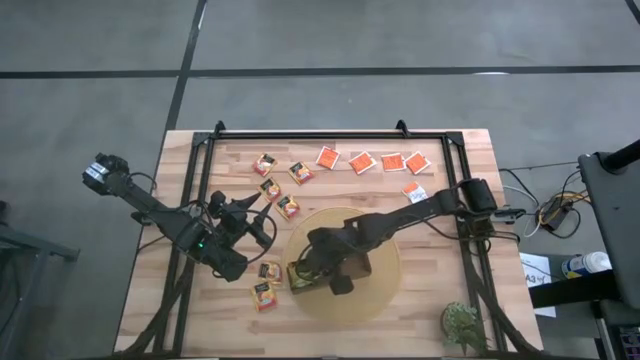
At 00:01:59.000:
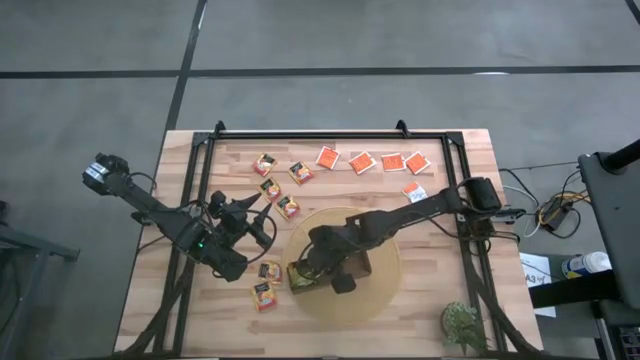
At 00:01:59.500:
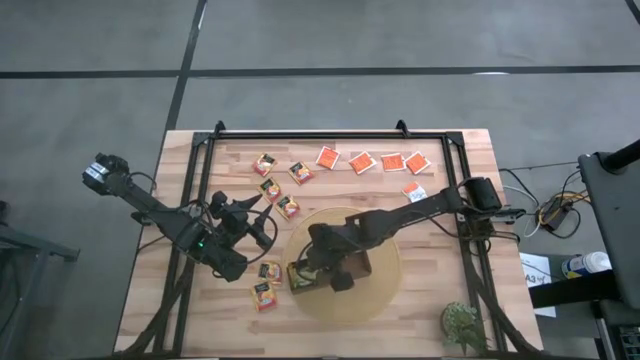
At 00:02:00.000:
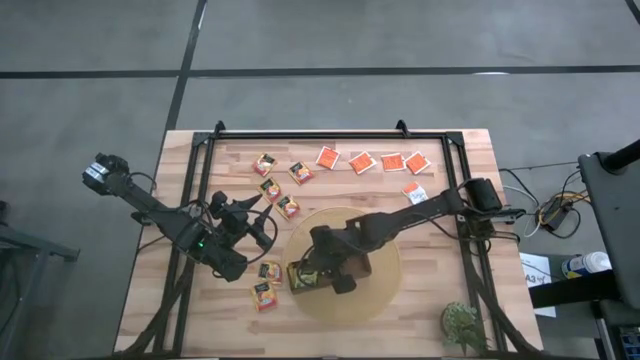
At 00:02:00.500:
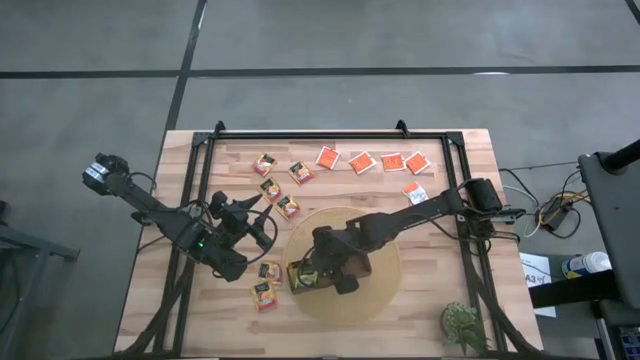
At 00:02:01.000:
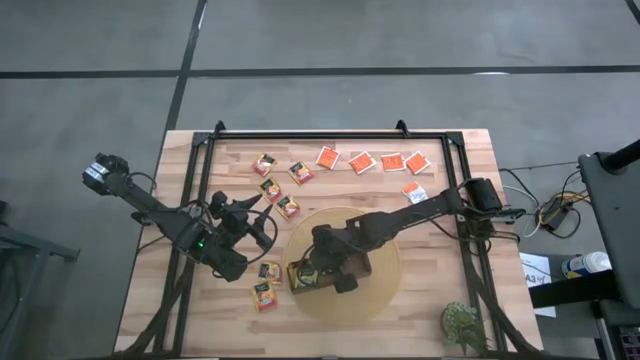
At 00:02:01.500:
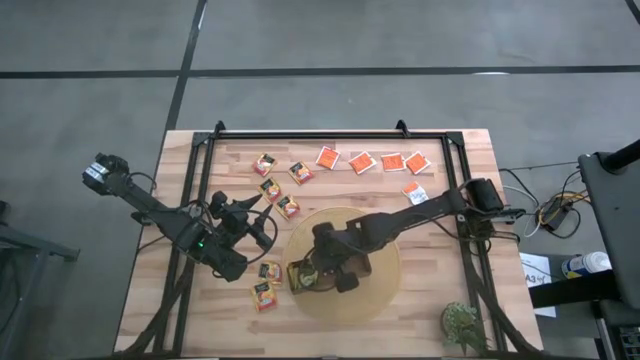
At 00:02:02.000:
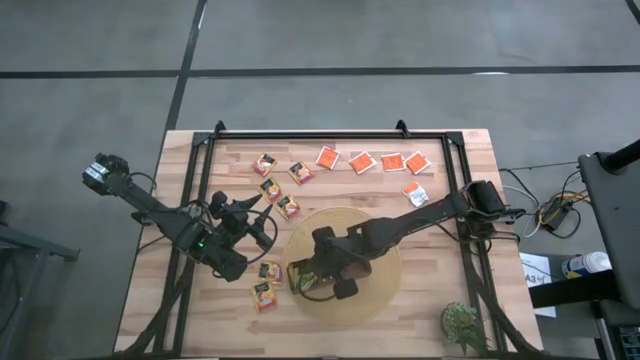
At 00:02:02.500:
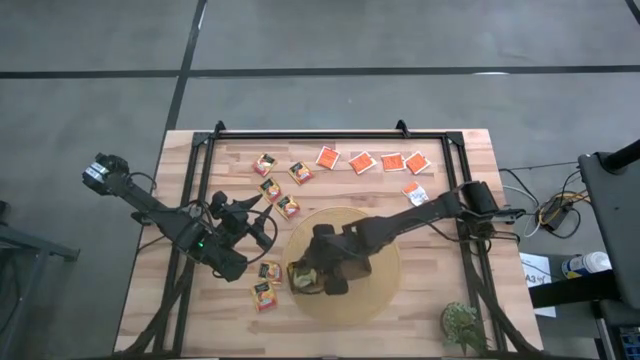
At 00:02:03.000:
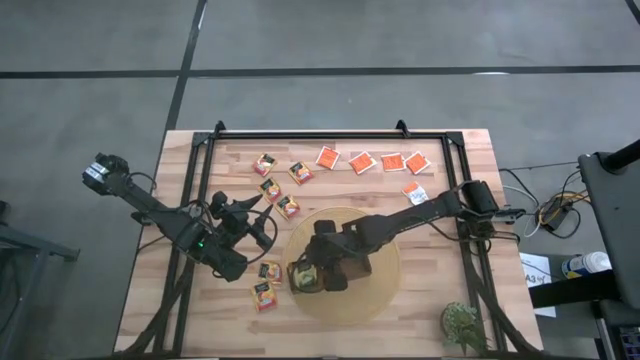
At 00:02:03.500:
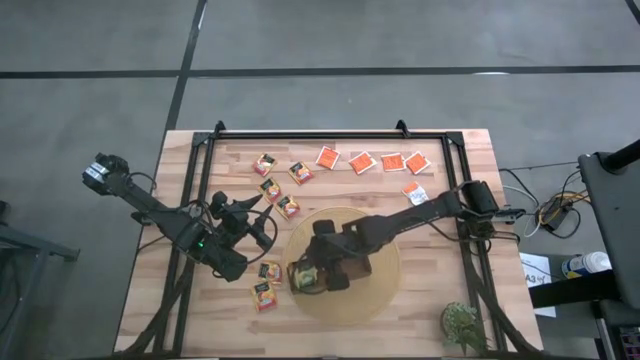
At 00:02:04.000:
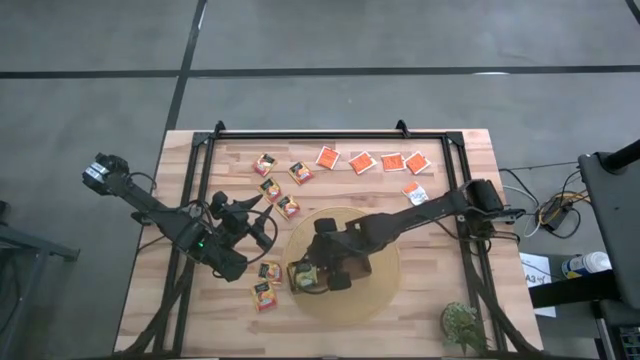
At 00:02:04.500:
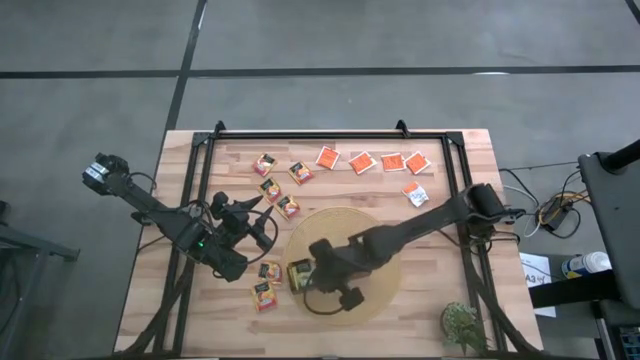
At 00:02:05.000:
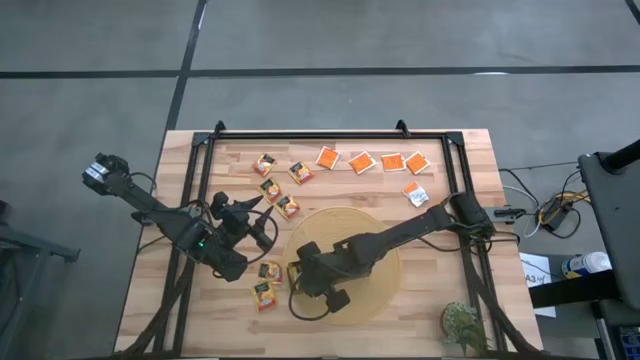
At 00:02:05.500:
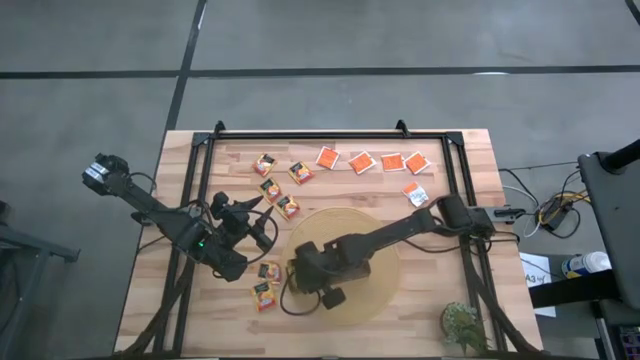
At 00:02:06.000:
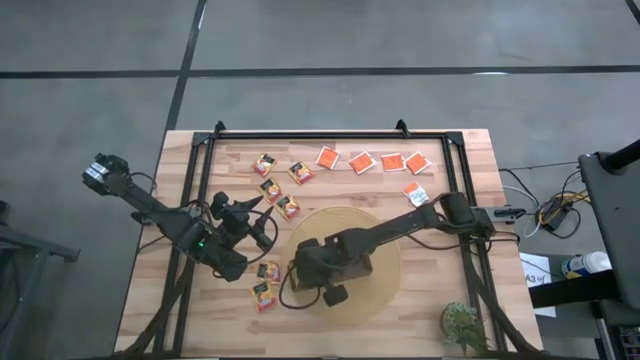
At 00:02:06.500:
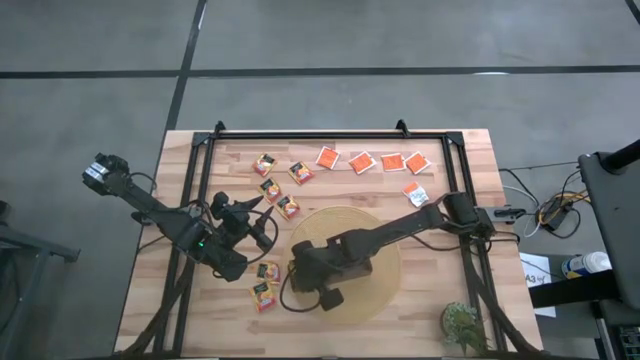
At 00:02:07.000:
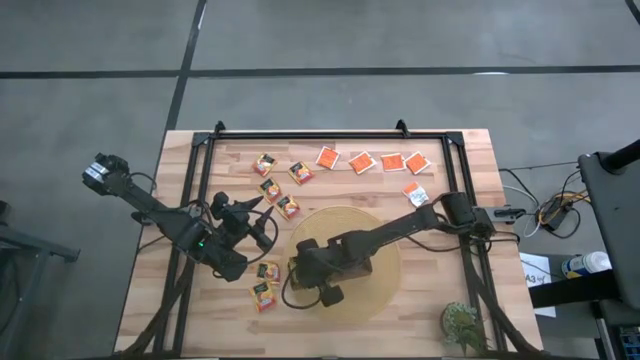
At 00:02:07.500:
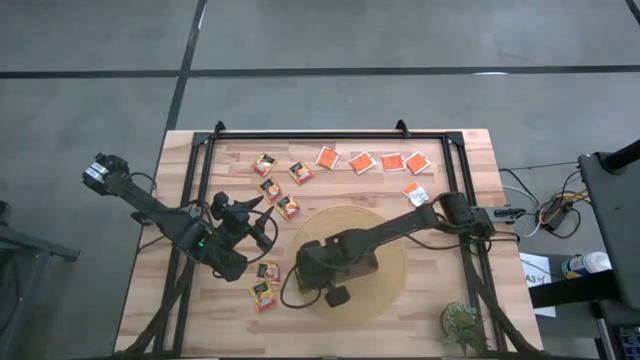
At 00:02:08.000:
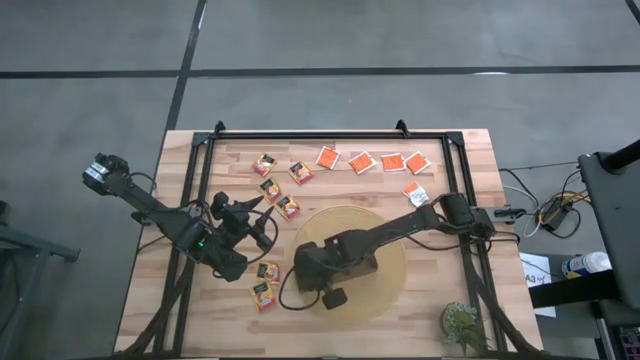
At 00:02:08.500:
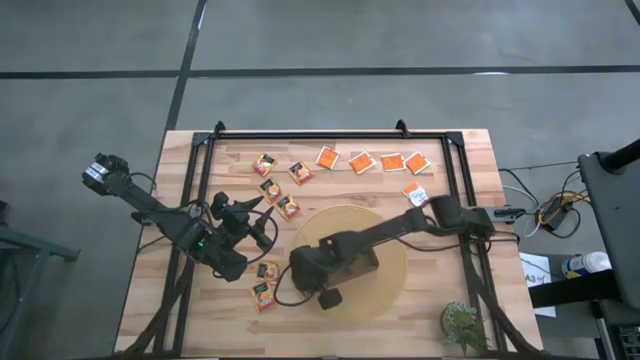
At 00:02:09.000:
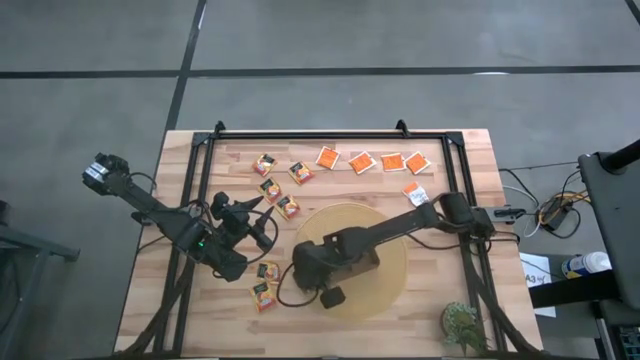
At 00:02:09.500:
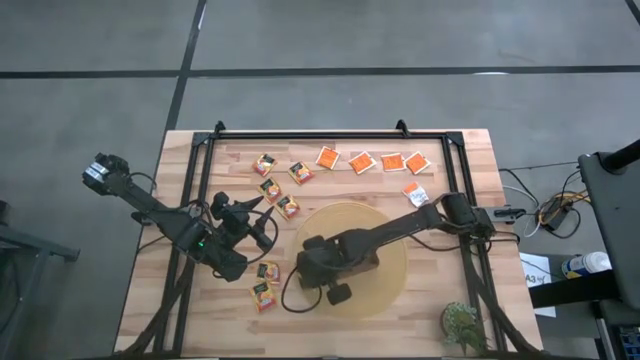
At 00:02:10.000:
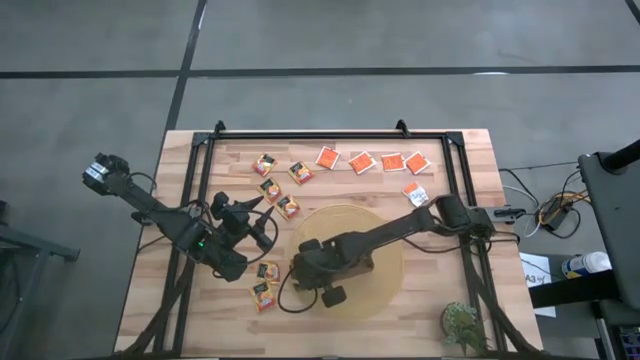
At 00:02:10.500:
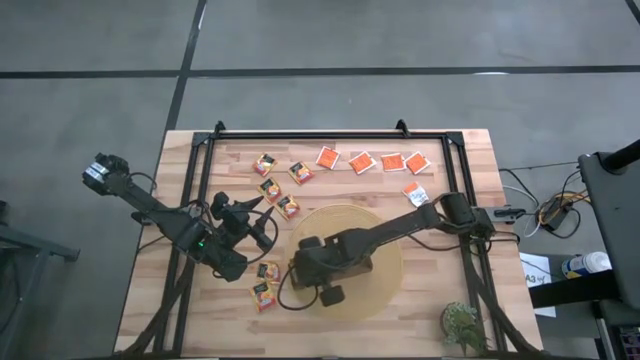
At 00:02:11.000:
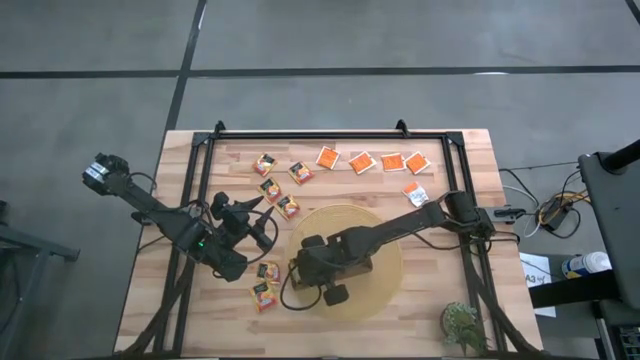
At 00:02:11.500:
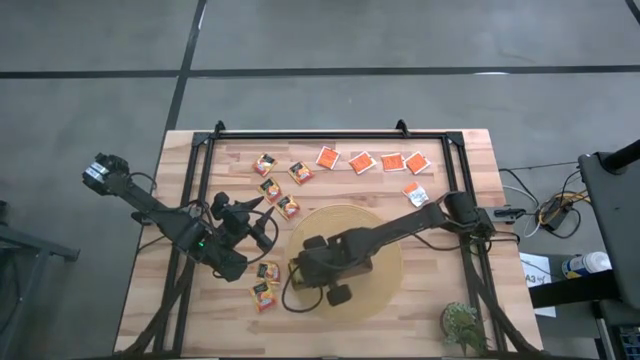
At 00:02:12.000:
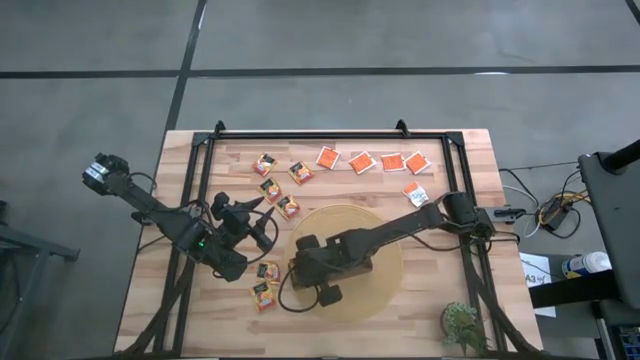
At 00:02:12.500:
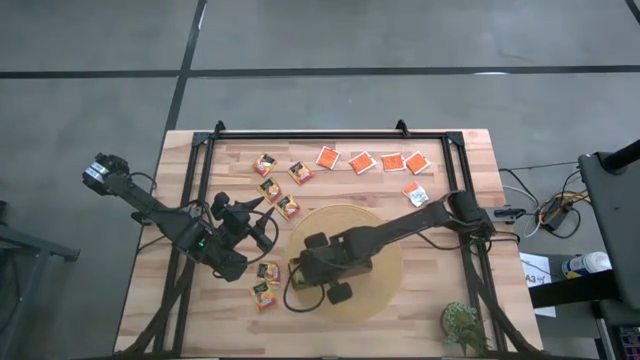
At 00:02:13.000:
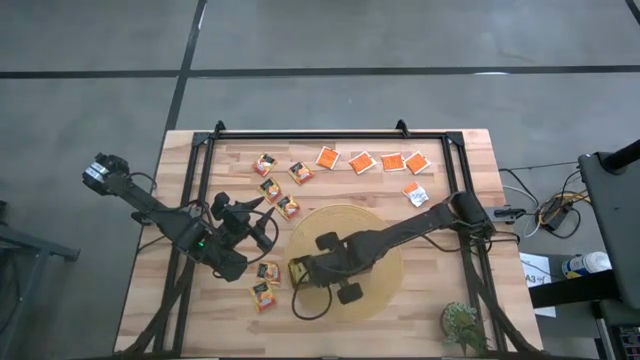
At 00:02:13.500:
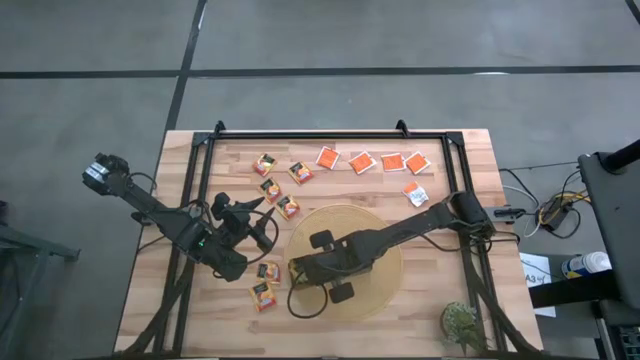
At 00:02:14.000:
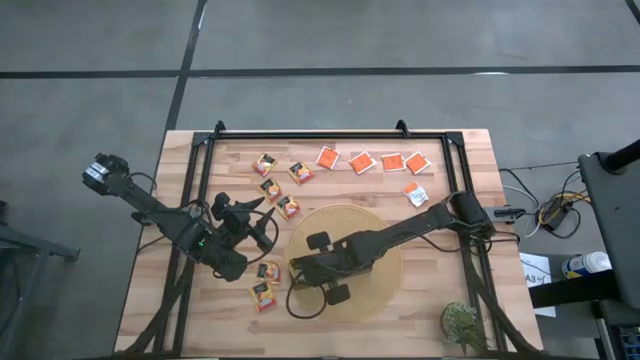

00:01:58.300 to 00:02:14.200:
Task: Pick & Place Tea
Put the green tea bag into the left section of the wooden organizer

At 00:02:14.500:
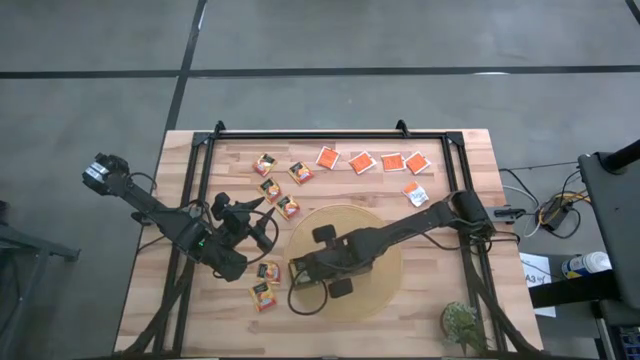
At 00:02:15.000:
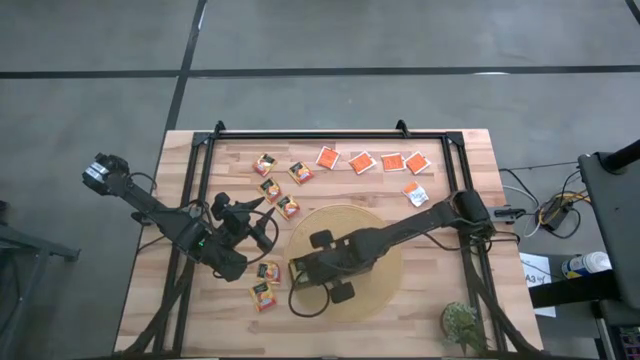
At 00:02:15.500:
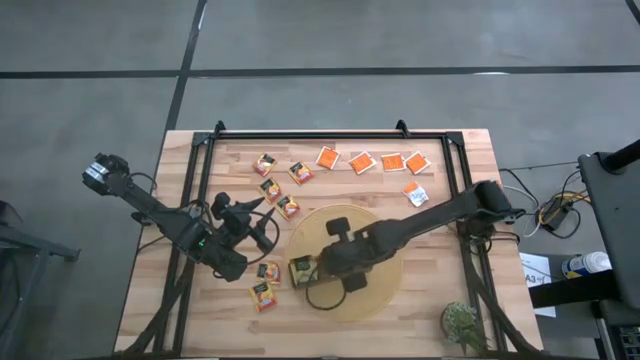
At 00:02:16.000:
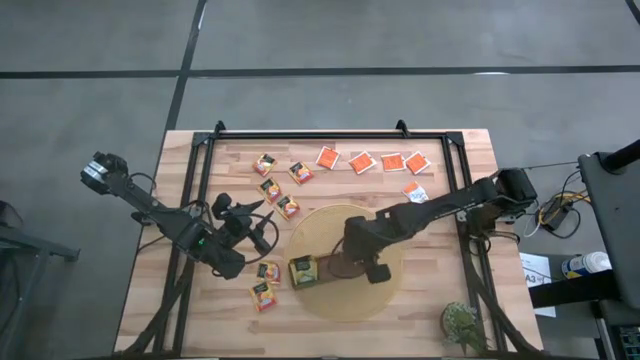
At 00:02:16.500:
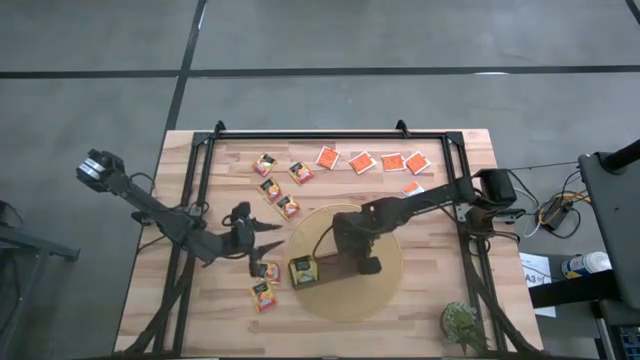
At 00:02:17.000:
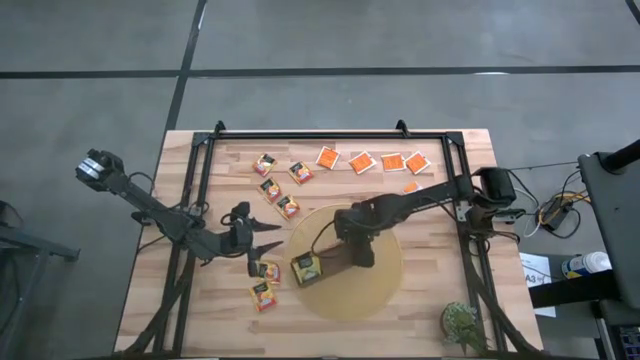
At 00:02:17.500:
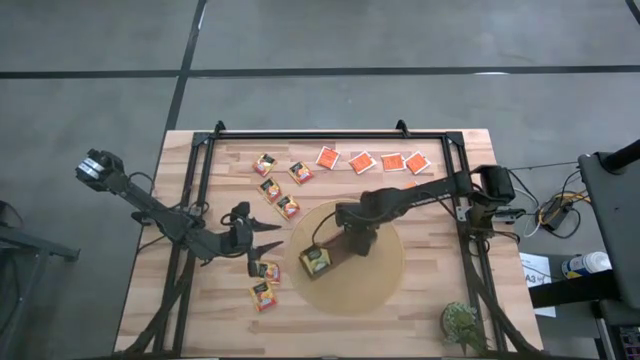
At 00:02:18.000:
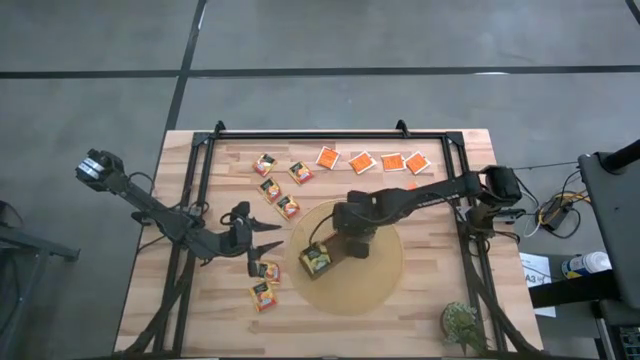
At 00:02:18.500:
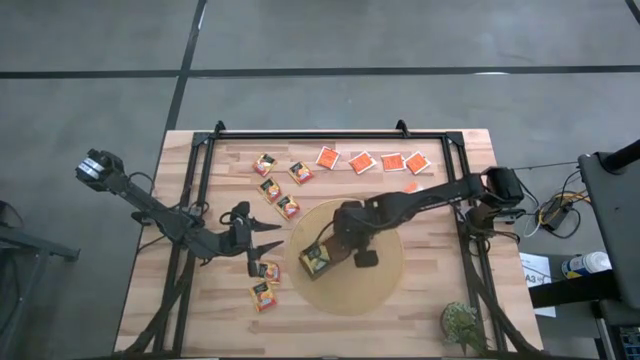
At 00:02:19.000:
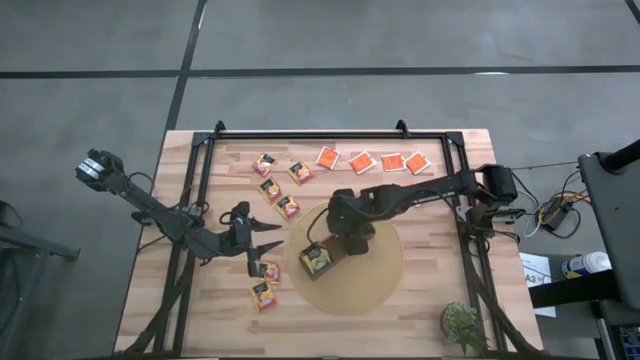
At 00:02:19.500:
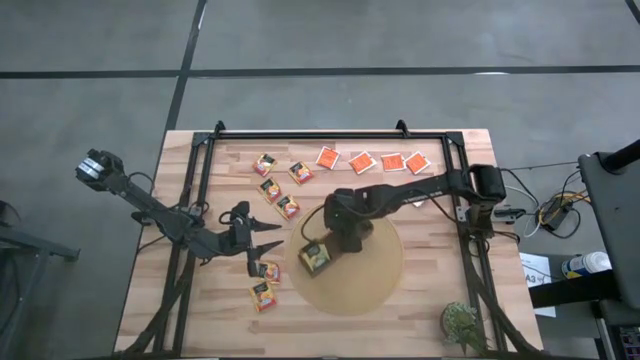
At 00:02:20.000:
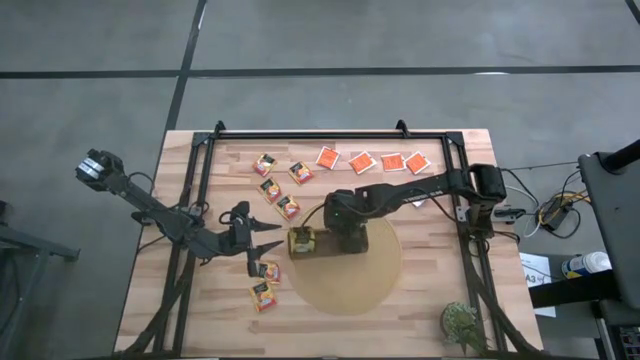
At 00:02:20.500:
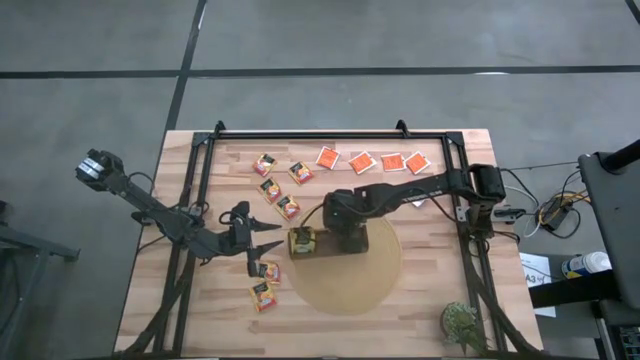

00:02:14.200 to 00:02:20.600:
Adjust the wood organizer
